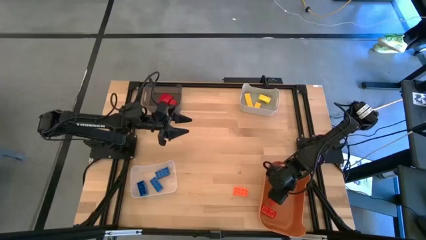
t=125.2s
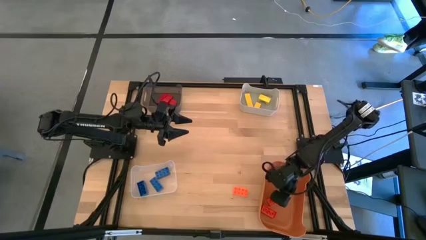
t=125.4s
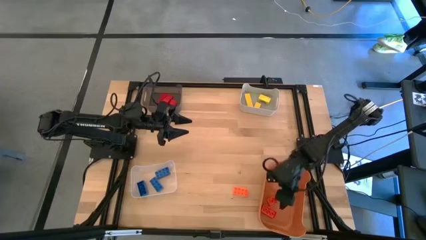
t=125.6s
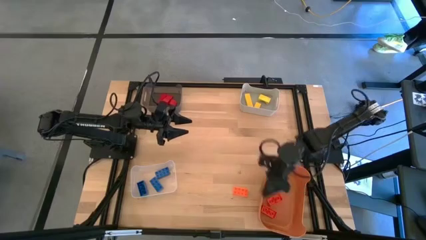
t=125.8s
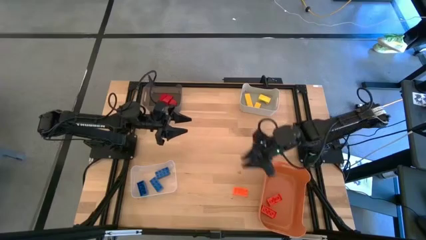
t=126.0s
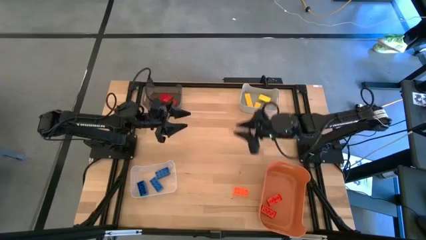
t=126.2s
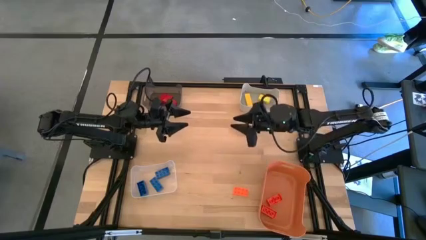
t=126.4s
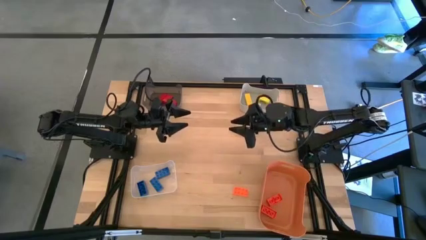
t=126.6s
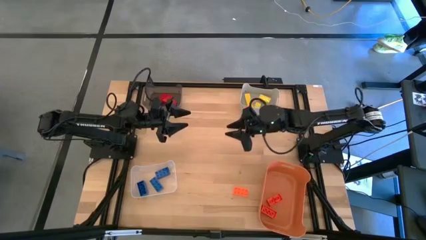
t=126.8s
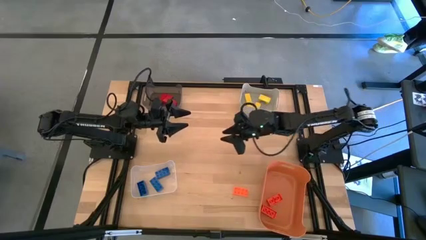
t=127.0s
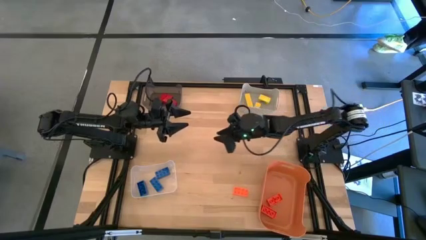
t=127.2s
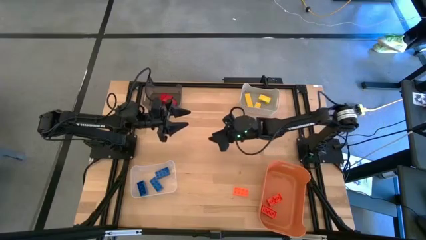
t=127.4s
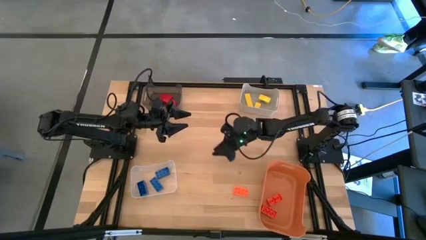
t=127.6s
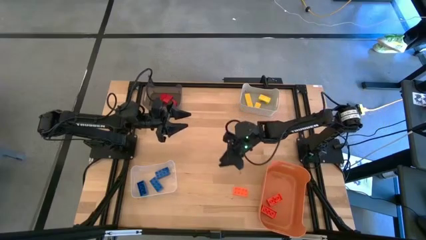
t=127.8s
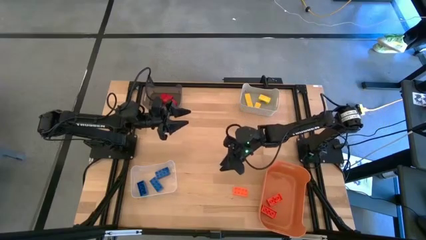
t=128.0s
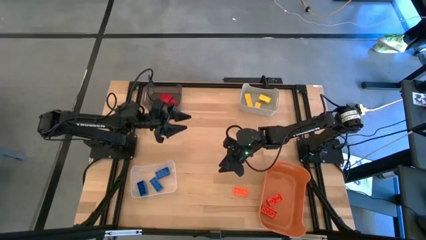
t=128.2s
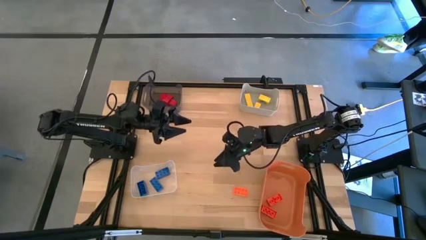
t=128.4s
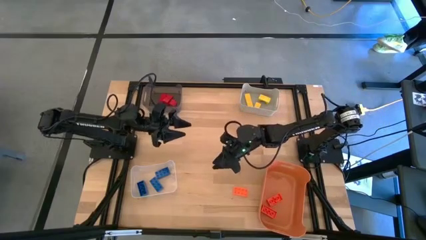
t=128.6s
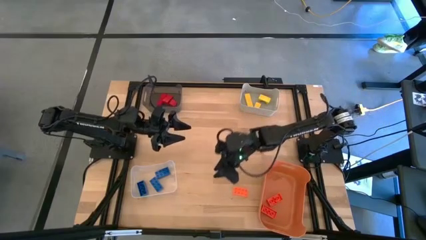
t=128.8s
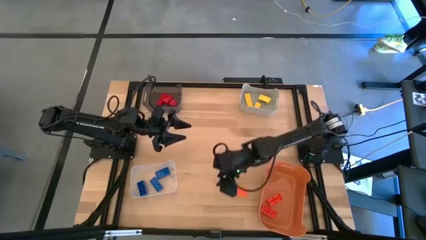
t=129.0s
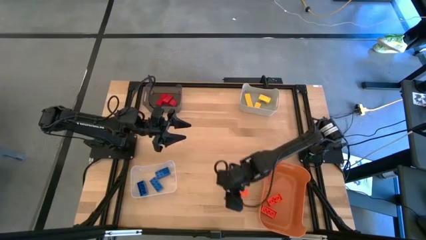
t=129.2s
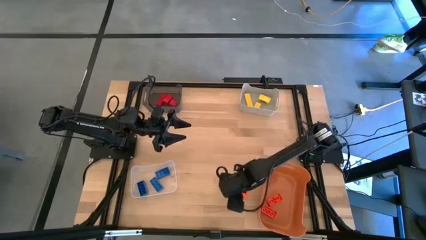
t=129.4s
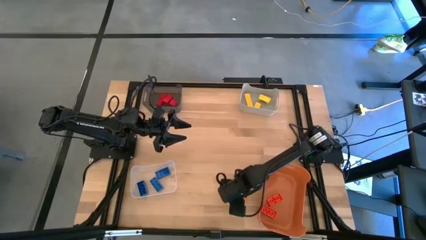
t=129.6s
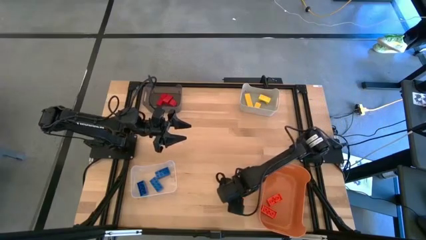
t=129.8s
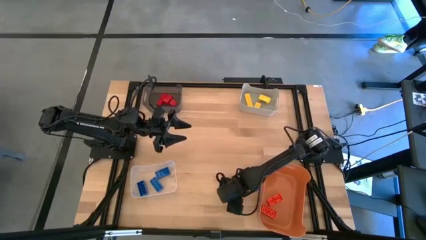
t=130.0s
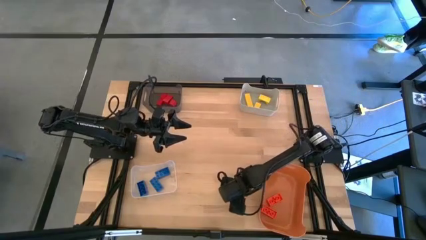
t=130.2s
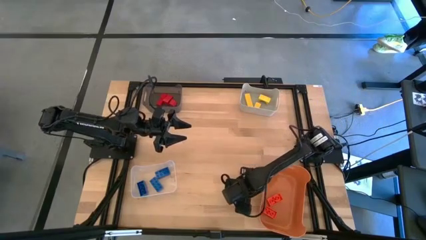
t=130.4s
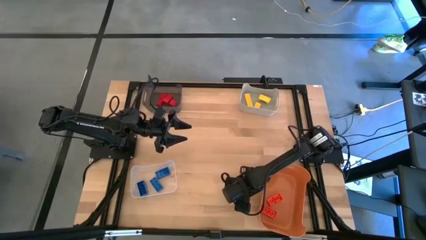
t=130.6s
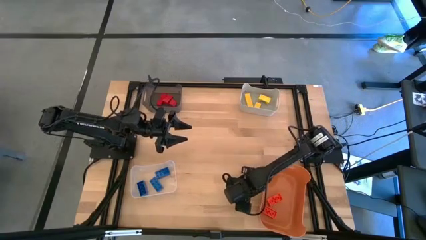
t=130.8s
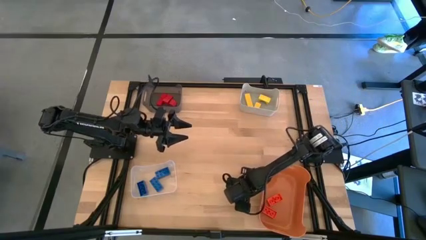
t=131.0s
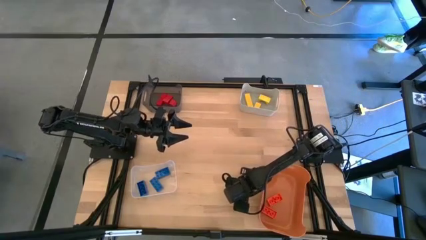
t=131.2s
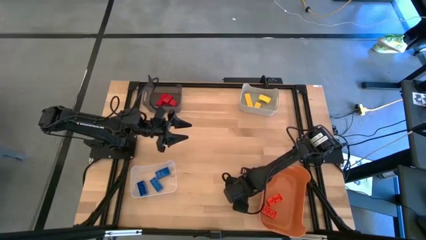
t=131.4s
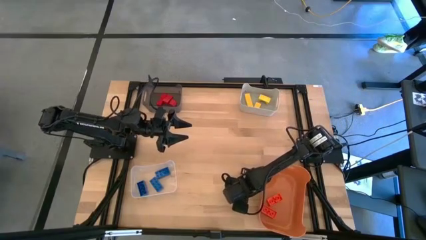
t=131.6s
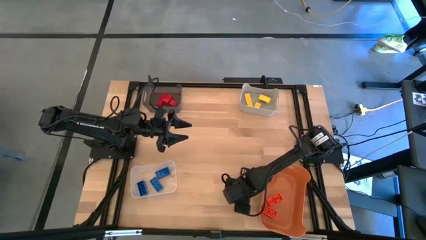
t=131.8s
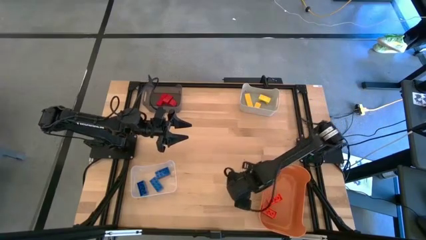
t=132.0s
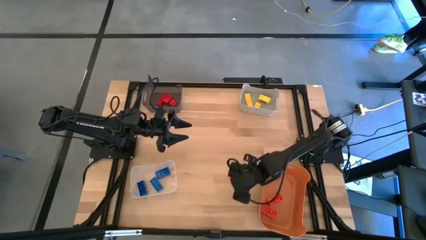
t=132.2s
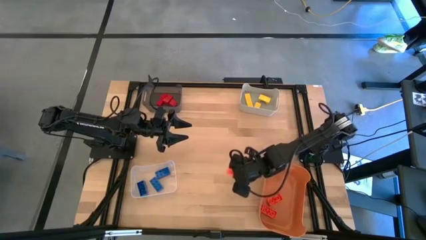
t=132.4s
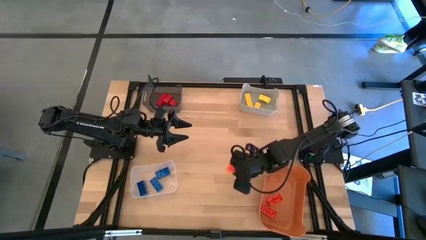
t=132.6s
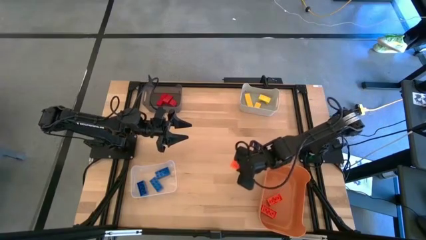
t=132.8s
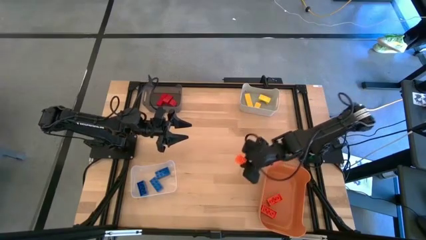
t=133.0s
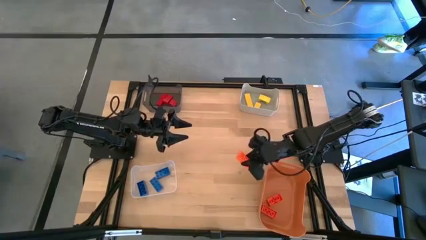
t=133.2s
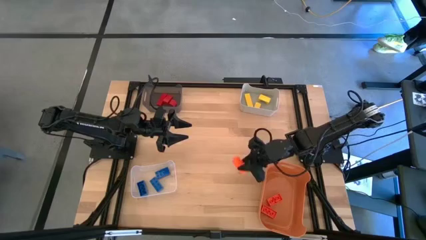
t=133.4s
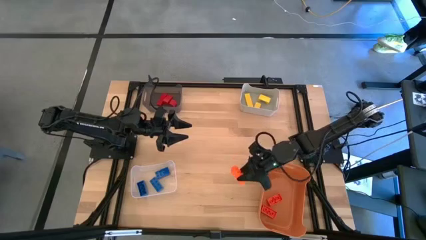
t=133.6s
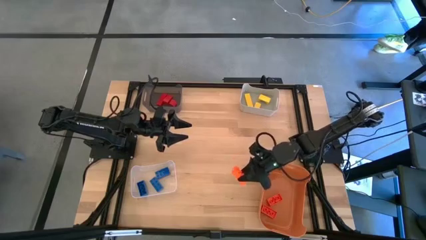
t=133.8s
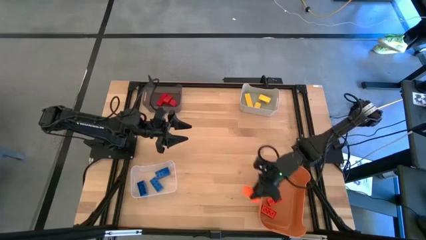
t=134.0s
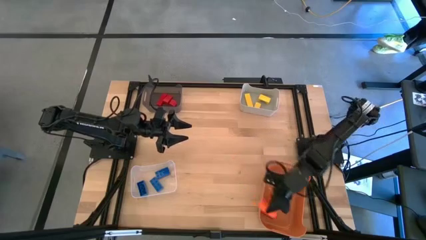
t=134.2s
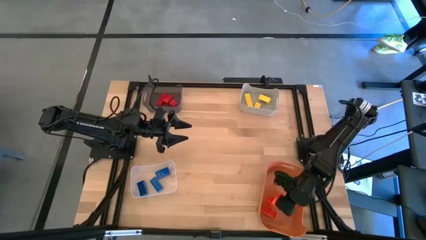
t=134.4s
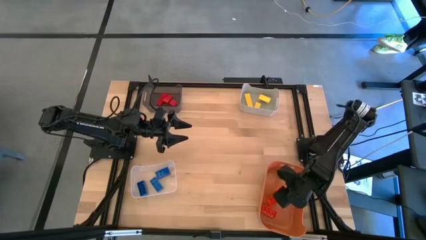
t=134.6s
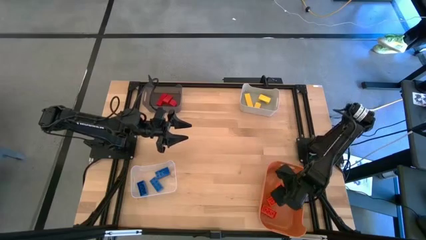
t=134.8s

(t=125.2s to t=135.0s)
Task: Sort & place blocks by color
Put the orange game piece into the orange bin
